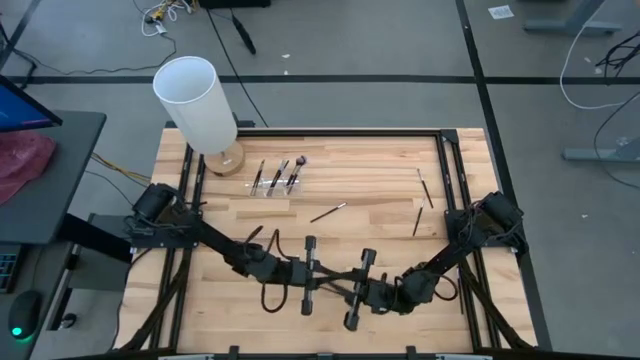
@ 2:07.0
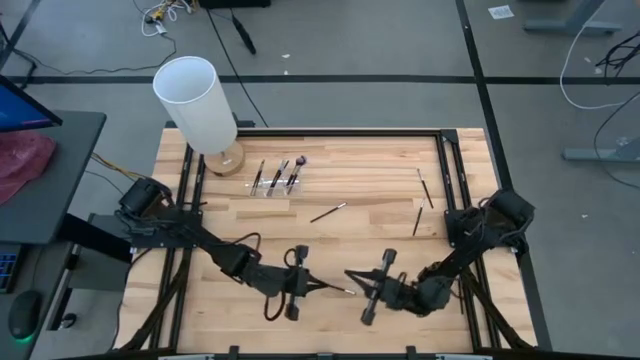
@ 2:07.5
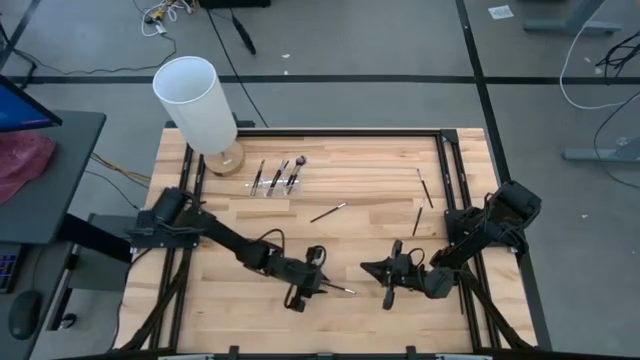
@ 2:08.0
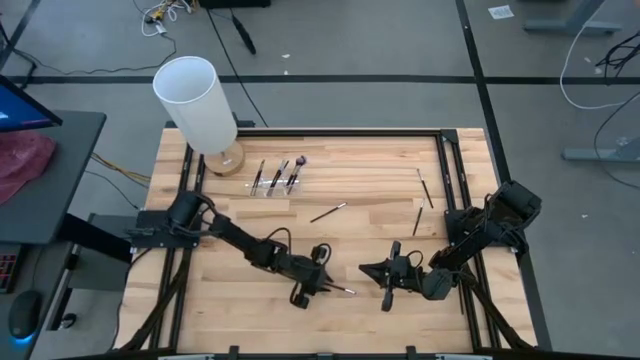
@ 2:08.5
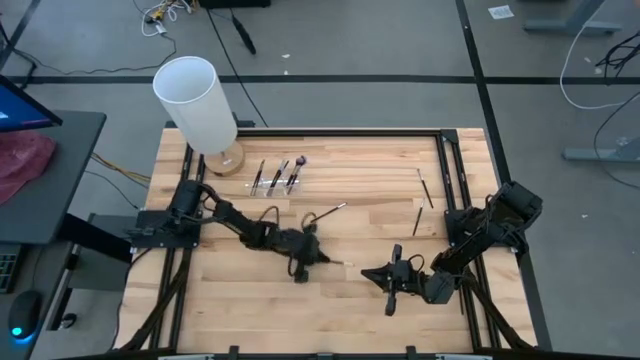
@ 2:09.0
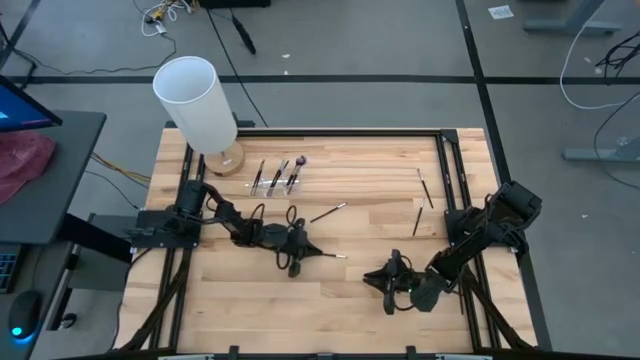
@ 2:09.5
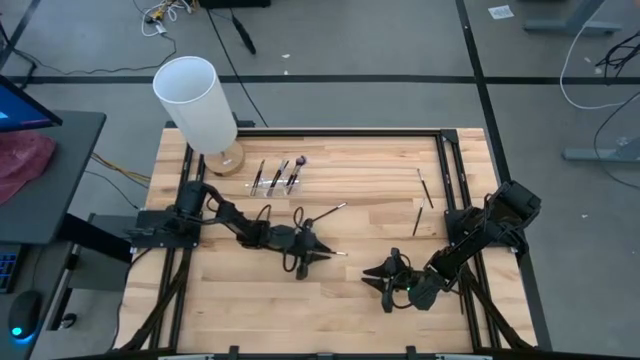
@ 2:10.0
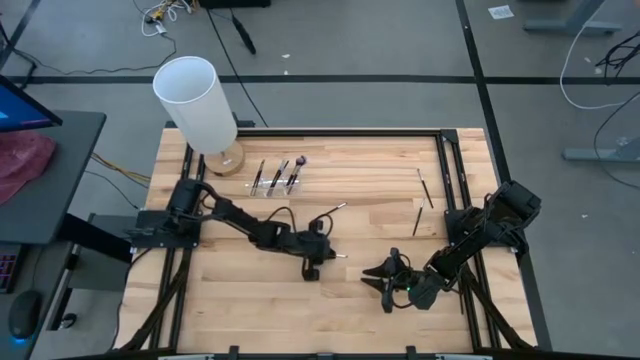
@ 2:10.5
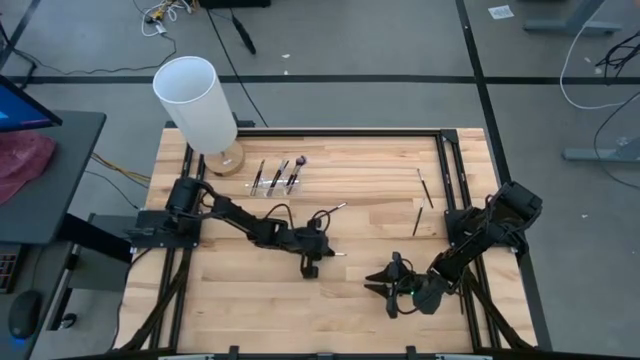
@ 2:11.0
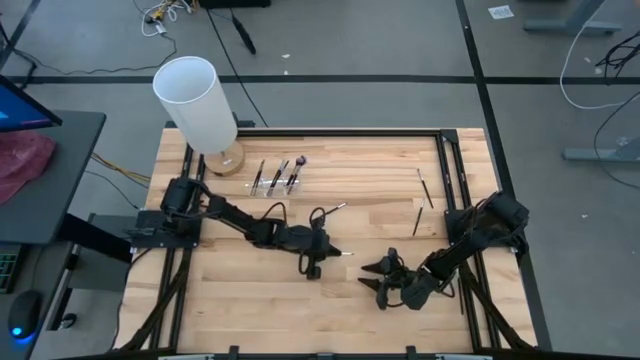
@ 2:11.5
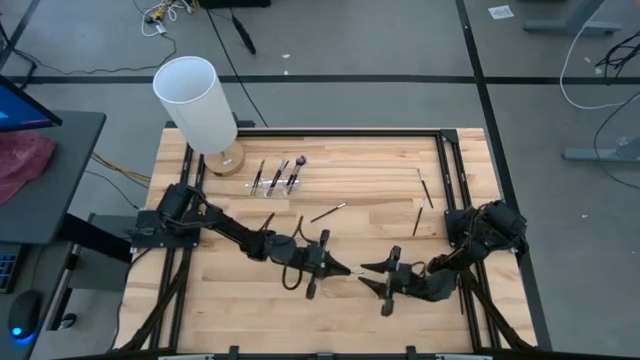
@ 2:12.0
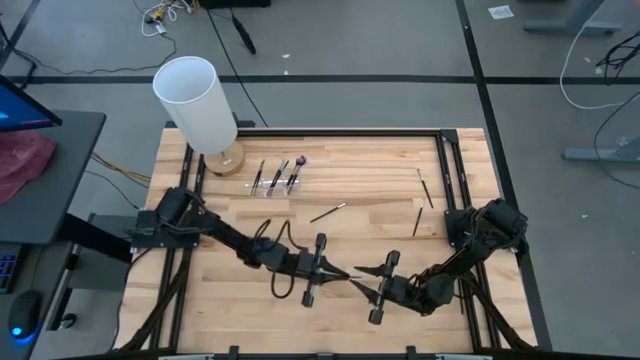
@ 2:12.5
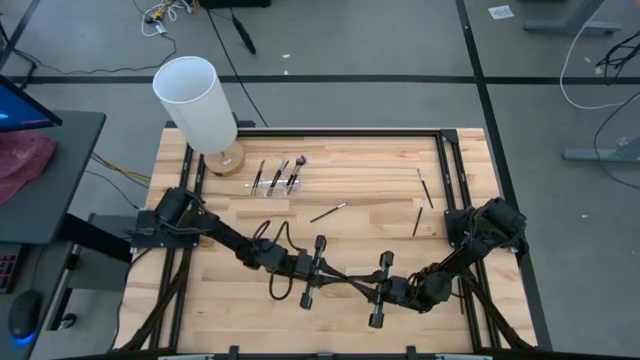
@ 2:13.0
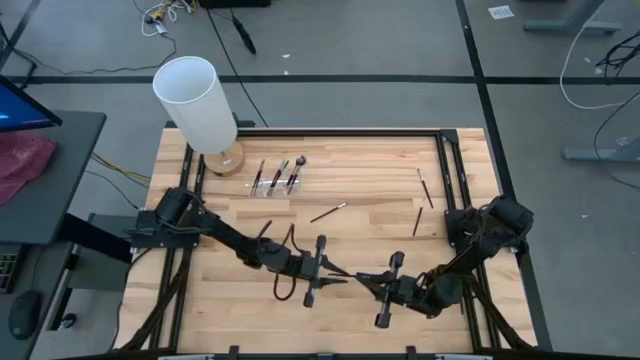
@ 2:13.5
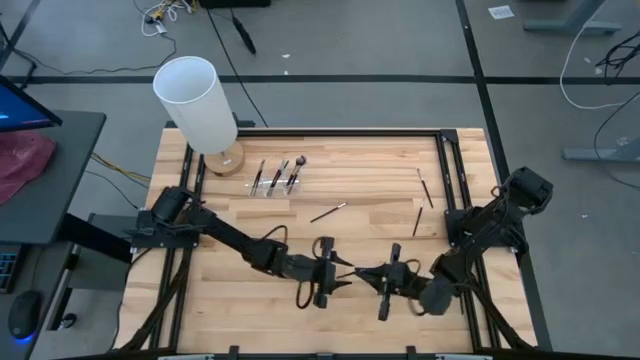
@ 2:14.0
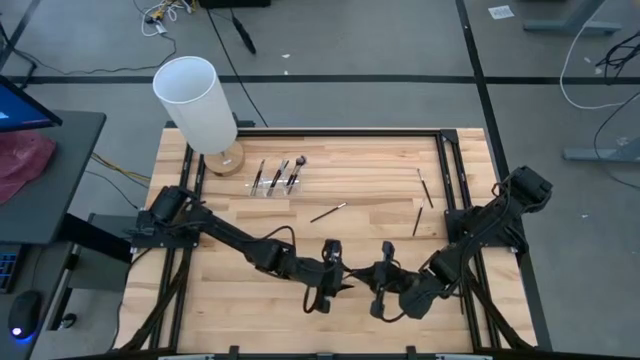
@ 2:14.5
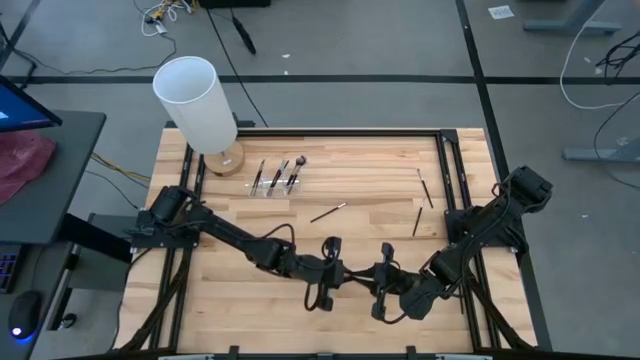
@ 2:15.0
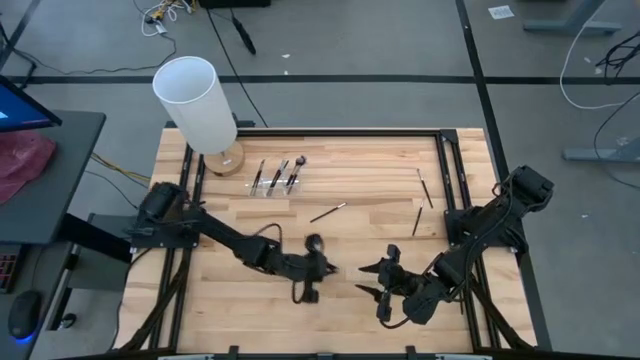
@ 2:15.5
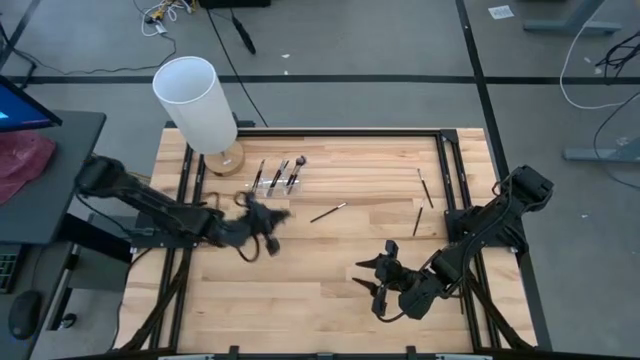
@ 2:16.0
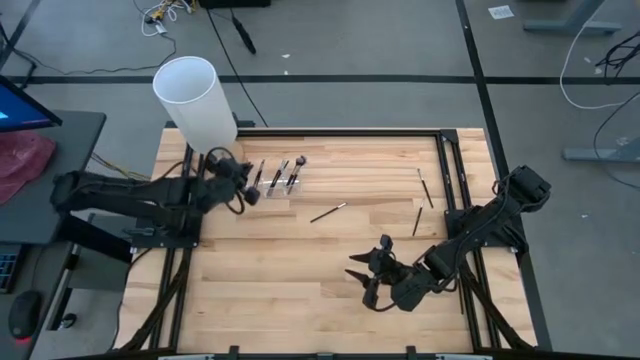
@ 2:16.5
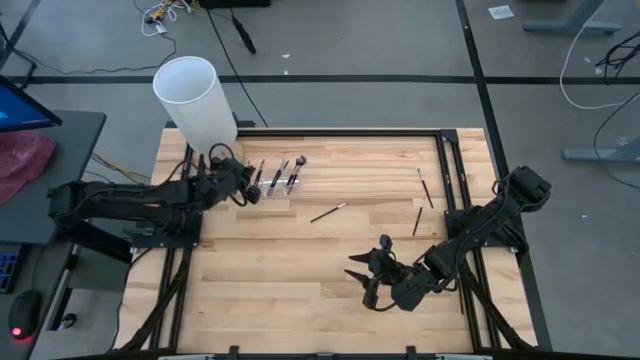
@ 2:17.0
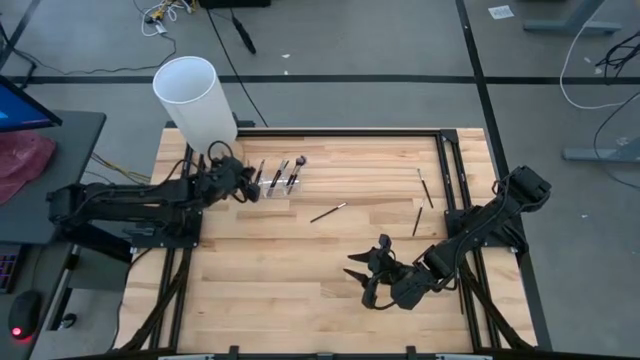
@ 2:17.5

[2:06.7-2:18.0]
Task: Put items in baskets/containers
Put the eyeshadow brush into the transparent organizer

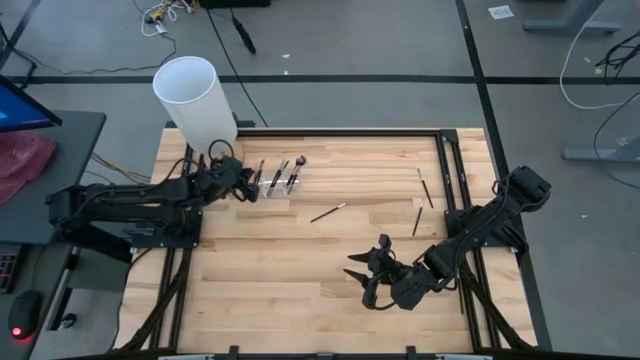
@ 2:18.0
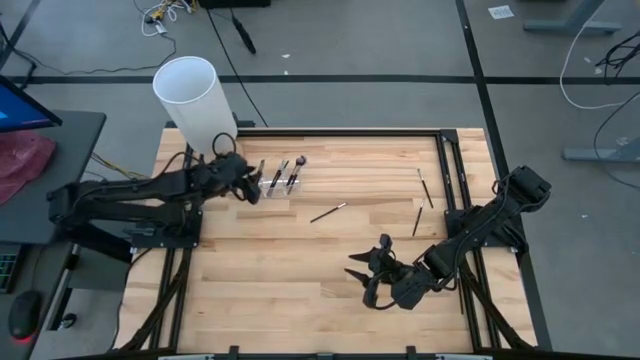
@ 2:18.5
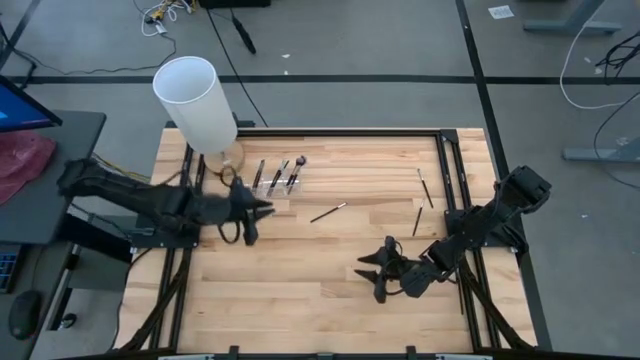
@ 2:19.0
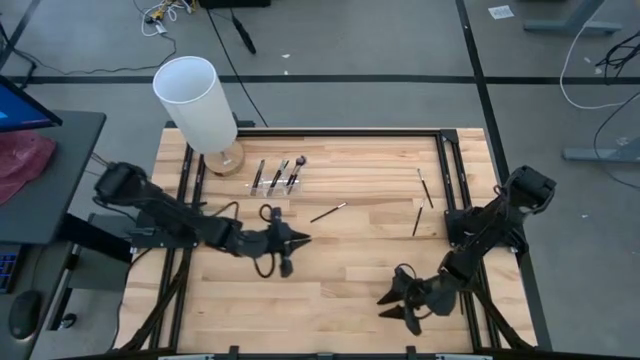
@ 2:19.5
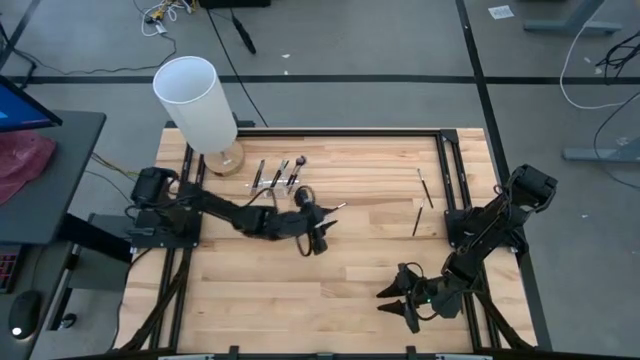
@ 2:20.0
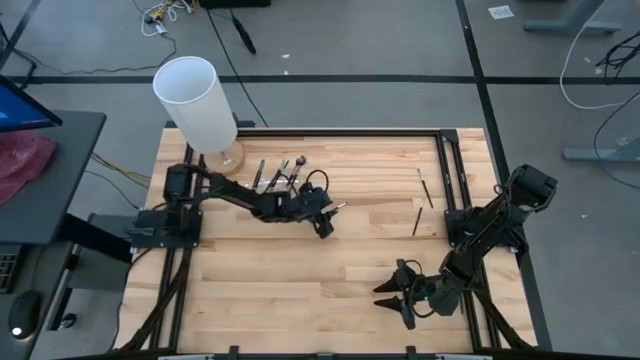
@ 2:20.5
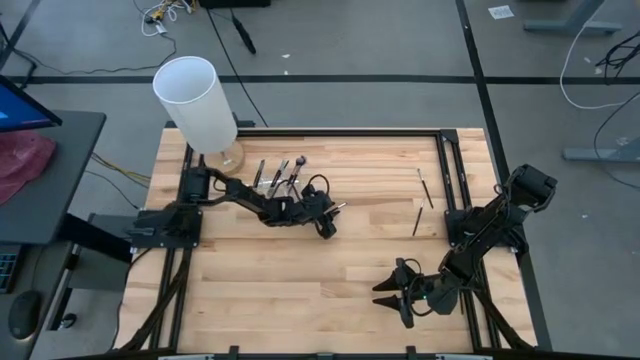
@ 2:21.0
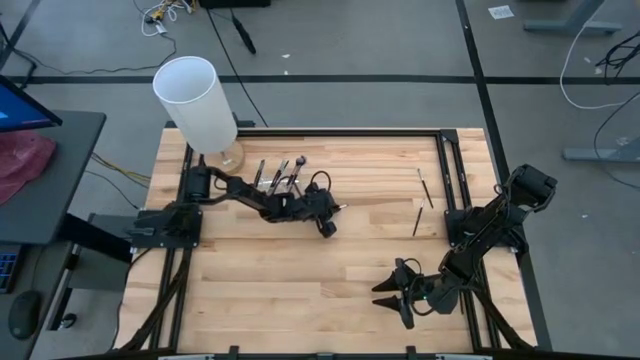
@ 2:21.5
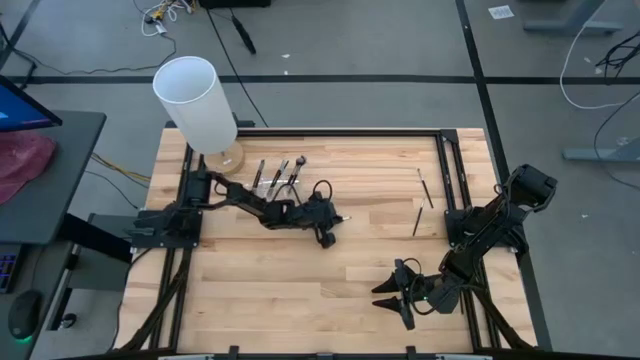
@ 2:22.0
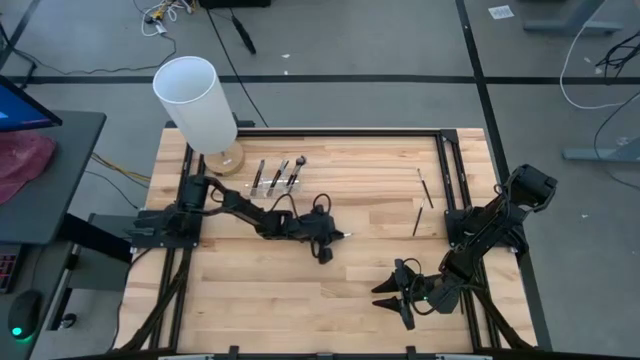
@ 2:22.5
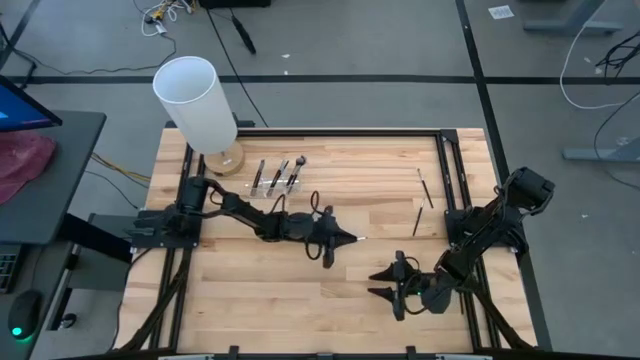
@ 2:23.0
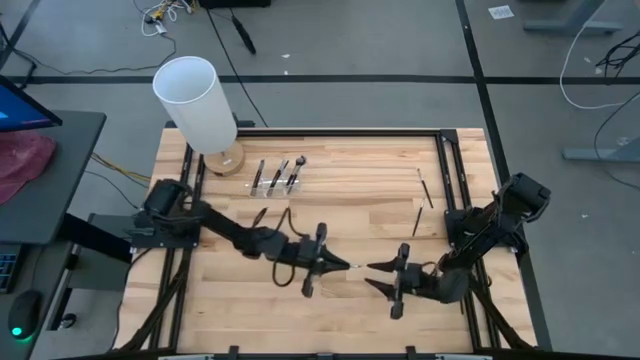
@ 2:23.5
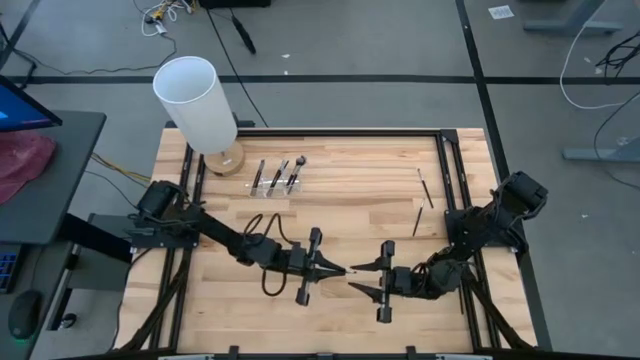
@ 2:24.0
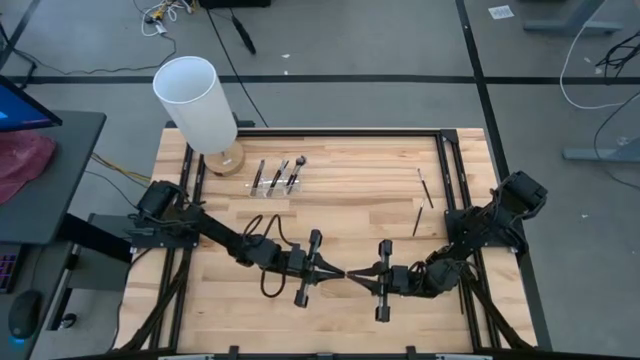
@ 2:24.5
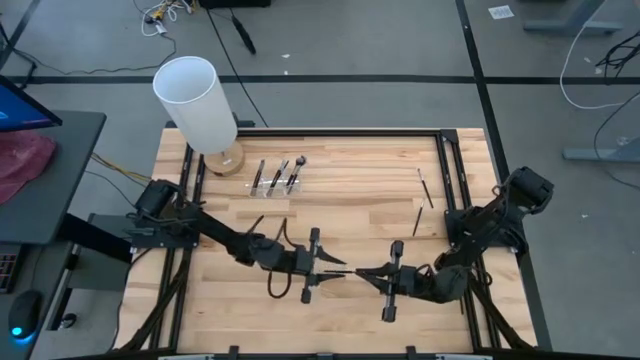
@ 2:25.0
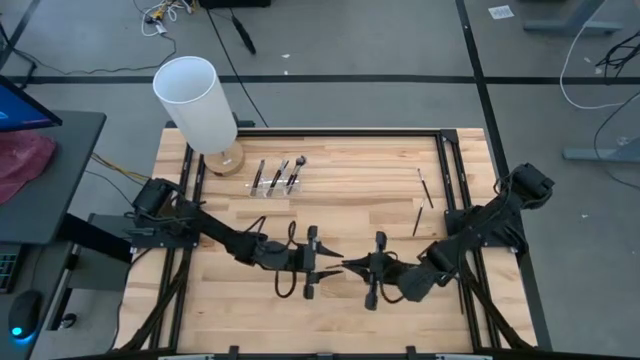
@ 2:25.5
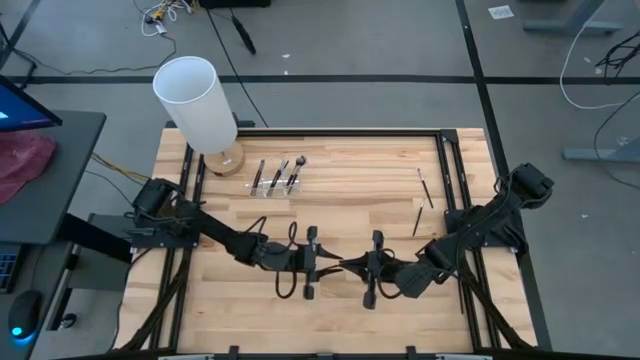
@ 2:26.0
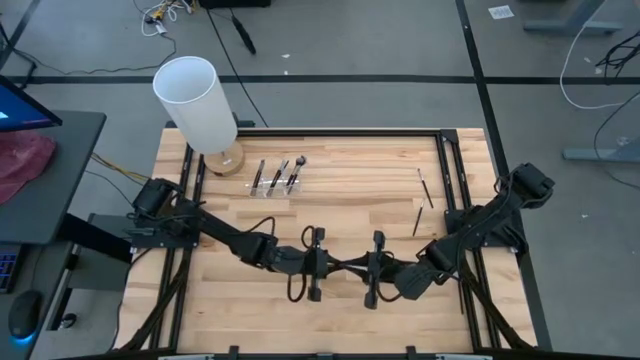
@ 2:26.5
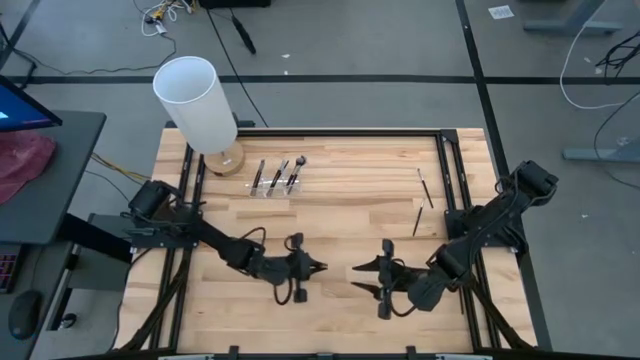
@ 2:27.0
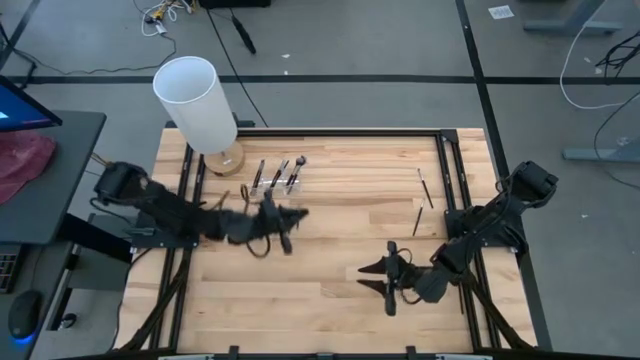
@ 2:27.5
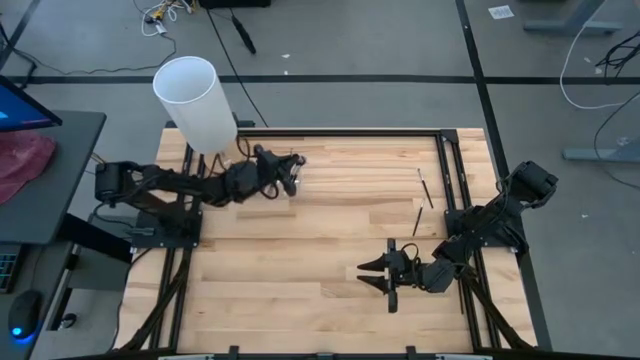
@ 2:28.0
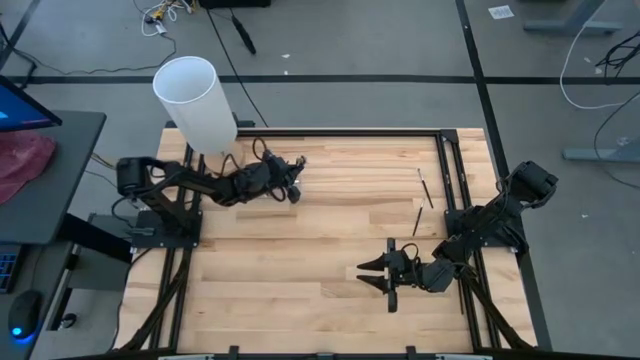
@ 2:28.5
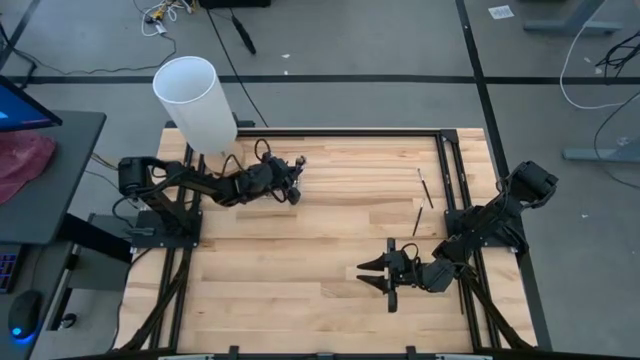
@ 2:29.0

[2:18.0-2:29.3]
Put the eyeshadow brush into the transparent organizer
